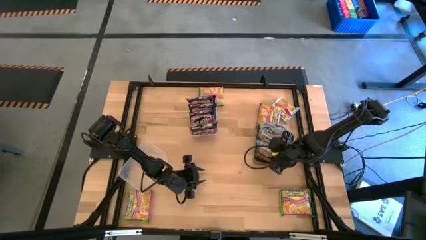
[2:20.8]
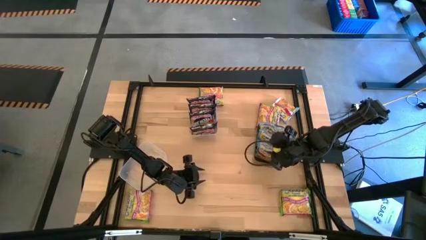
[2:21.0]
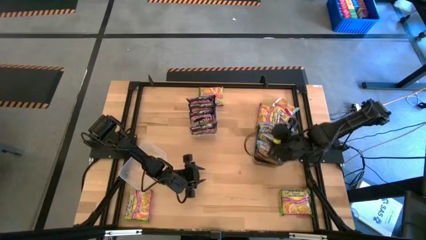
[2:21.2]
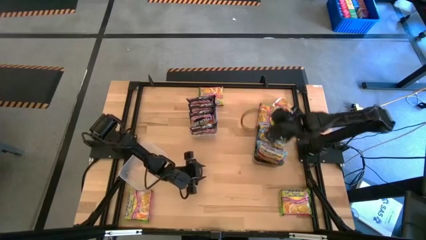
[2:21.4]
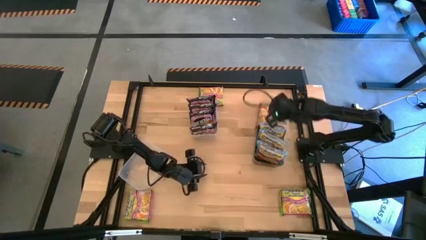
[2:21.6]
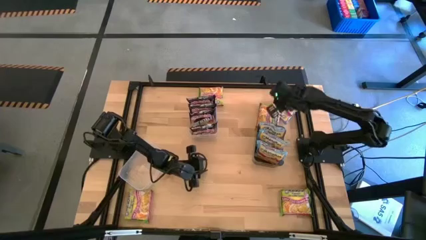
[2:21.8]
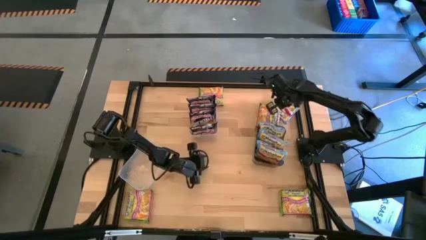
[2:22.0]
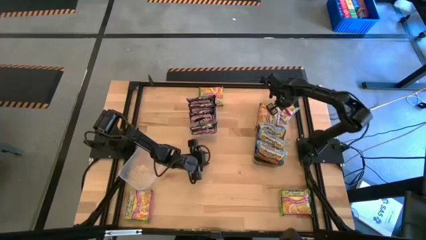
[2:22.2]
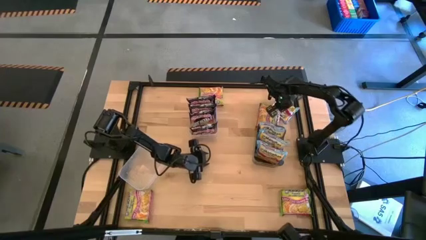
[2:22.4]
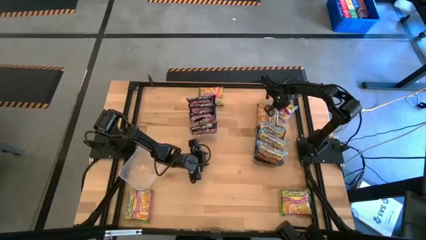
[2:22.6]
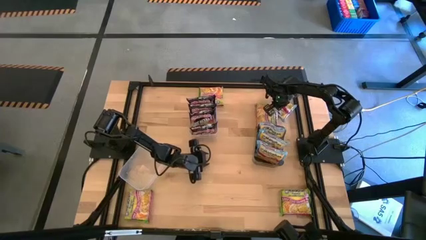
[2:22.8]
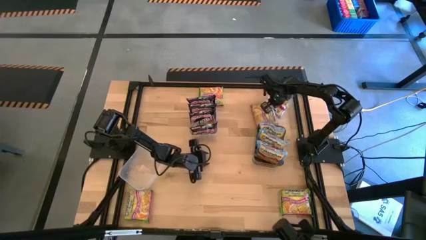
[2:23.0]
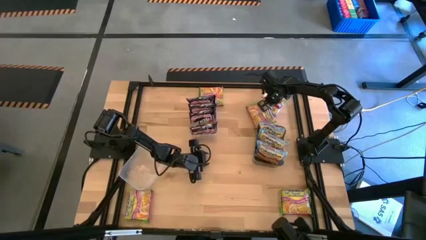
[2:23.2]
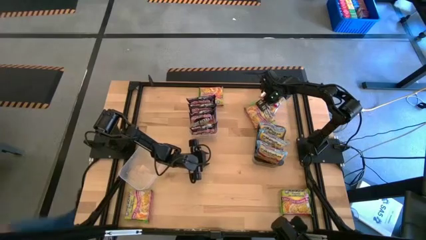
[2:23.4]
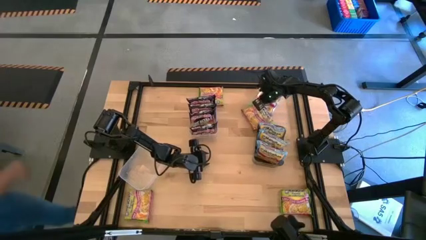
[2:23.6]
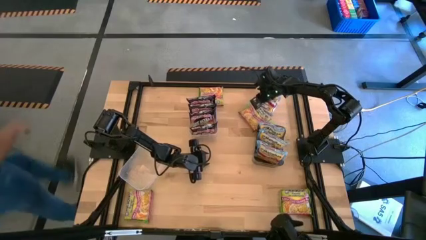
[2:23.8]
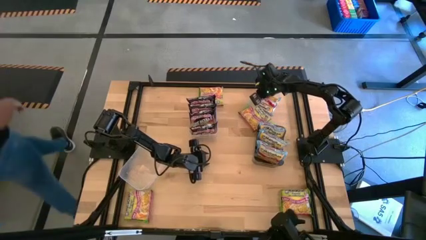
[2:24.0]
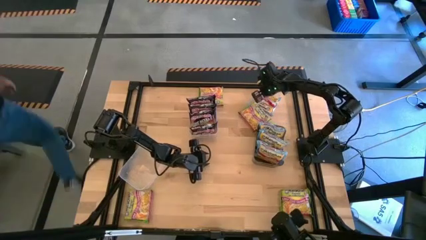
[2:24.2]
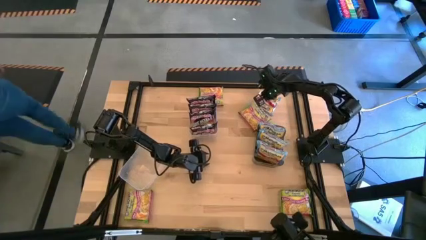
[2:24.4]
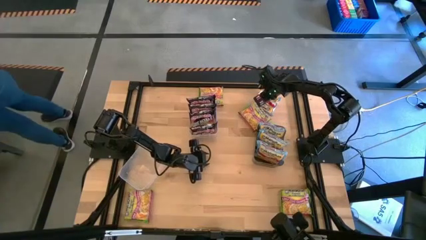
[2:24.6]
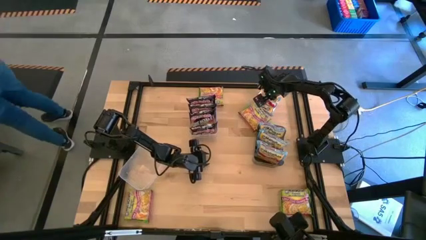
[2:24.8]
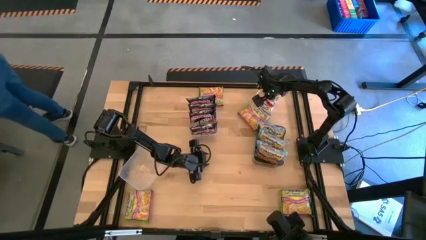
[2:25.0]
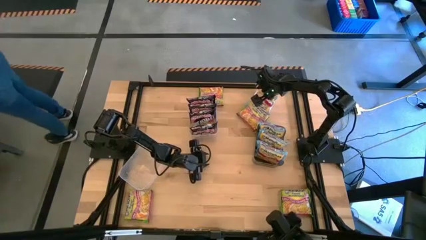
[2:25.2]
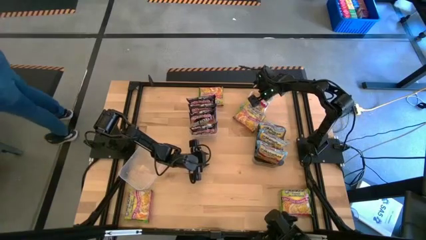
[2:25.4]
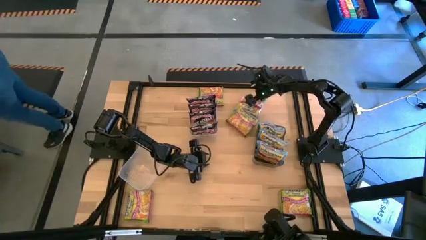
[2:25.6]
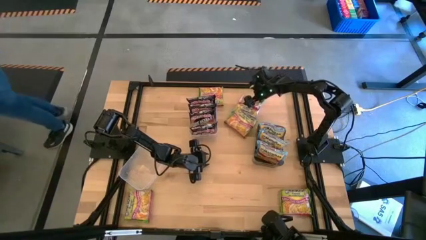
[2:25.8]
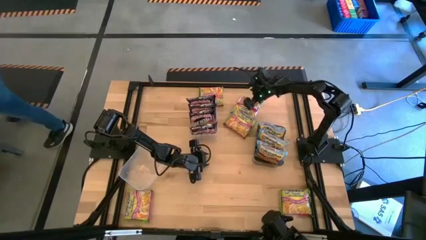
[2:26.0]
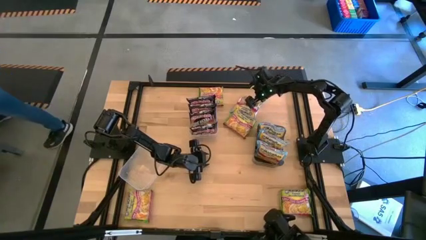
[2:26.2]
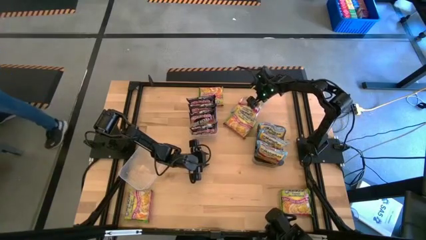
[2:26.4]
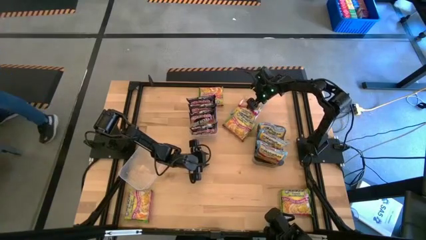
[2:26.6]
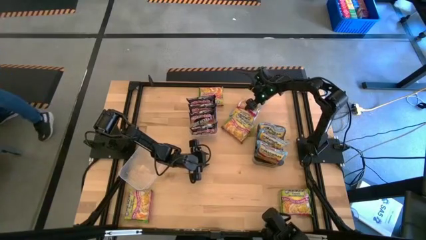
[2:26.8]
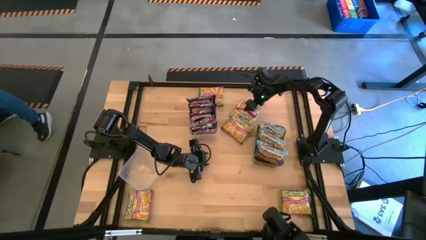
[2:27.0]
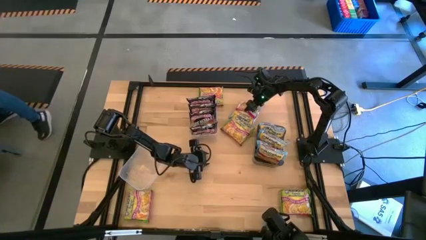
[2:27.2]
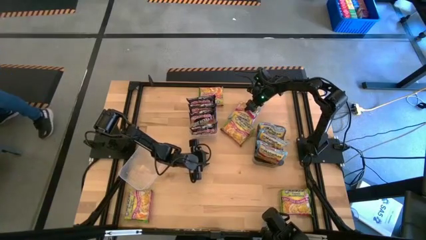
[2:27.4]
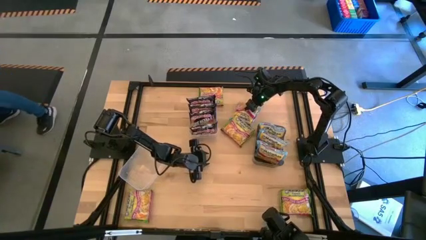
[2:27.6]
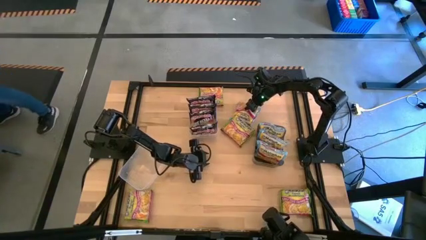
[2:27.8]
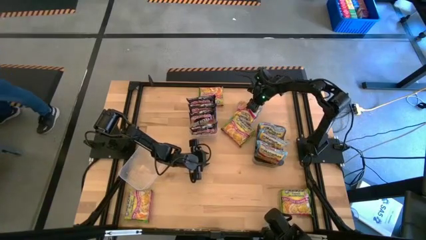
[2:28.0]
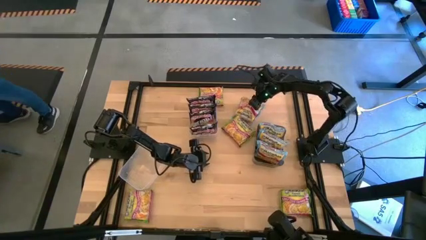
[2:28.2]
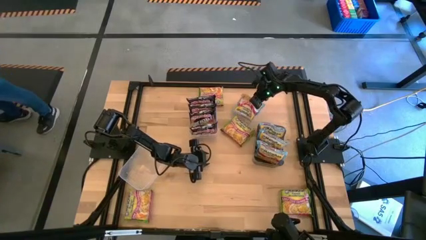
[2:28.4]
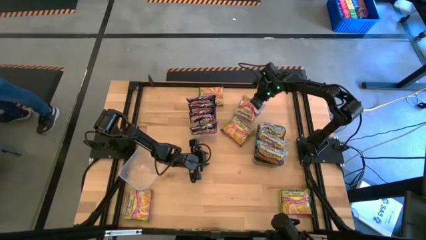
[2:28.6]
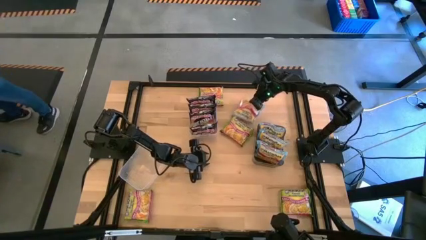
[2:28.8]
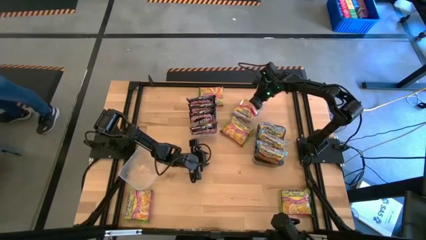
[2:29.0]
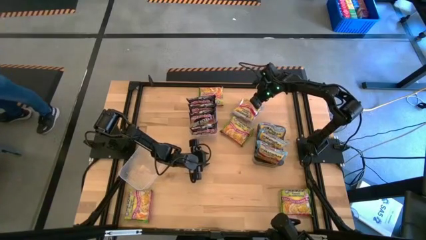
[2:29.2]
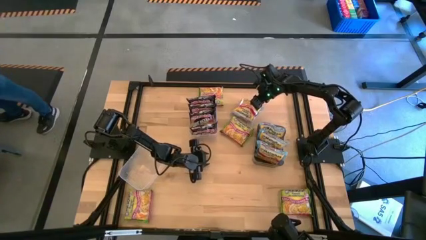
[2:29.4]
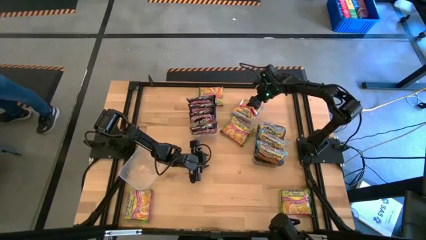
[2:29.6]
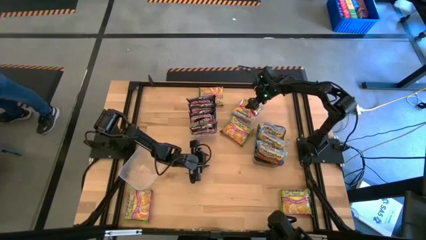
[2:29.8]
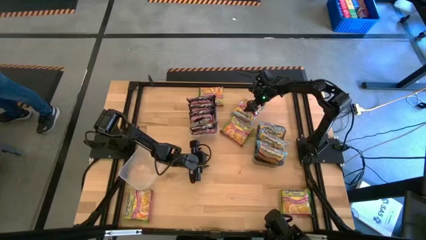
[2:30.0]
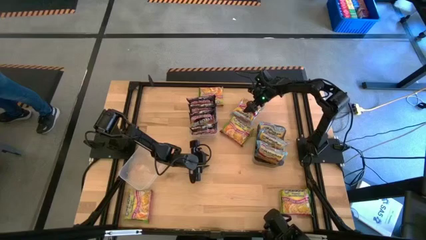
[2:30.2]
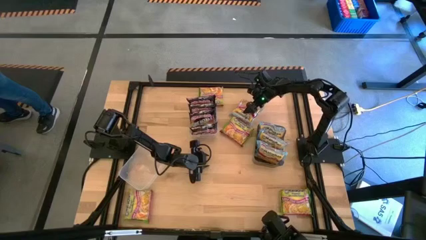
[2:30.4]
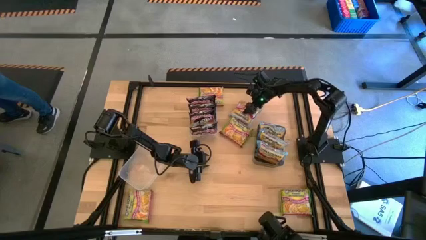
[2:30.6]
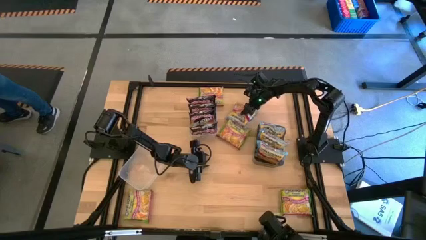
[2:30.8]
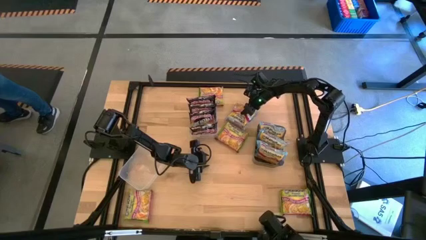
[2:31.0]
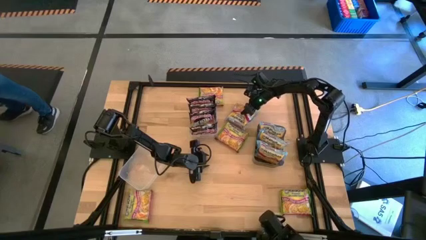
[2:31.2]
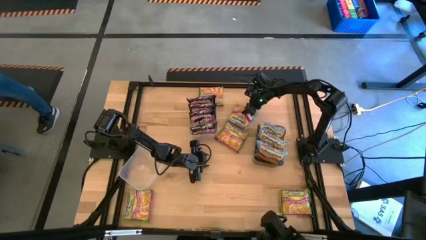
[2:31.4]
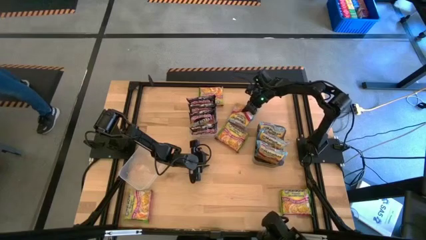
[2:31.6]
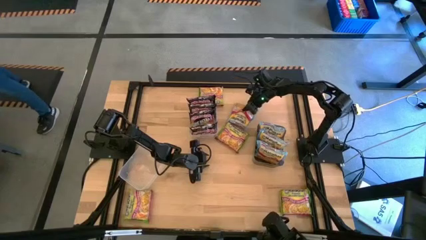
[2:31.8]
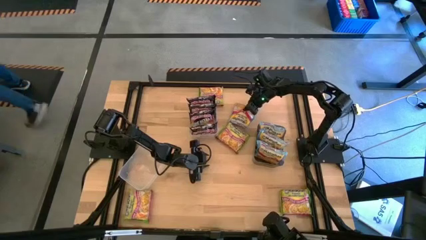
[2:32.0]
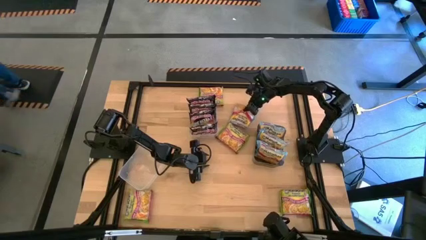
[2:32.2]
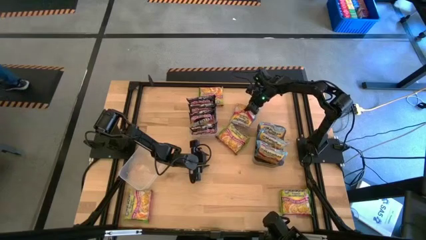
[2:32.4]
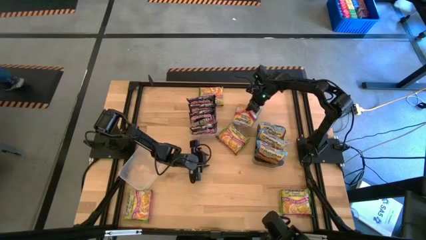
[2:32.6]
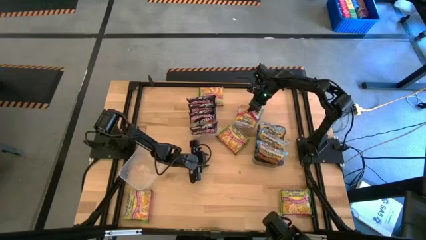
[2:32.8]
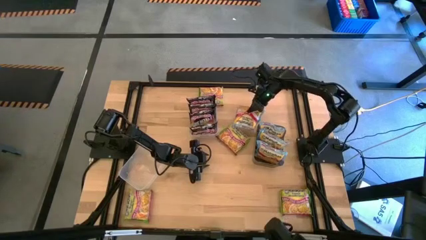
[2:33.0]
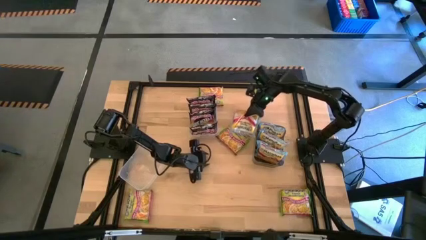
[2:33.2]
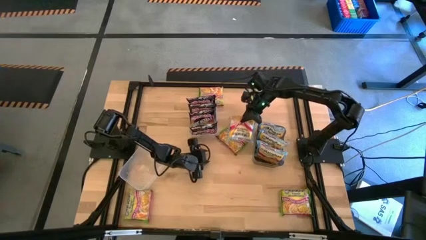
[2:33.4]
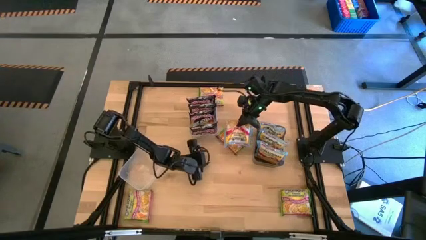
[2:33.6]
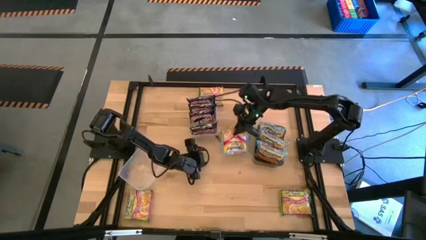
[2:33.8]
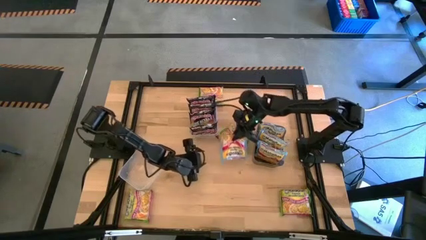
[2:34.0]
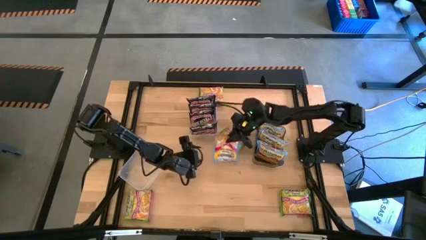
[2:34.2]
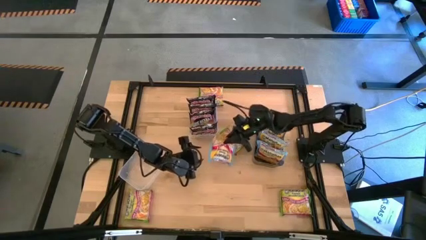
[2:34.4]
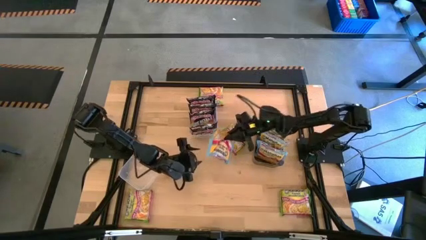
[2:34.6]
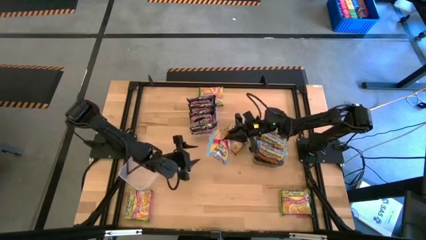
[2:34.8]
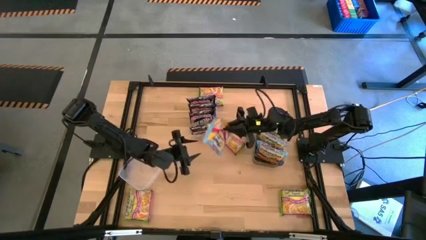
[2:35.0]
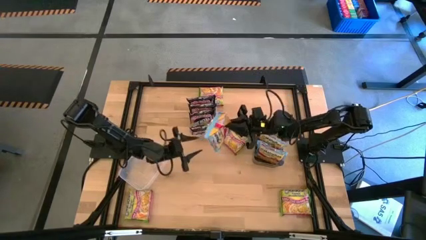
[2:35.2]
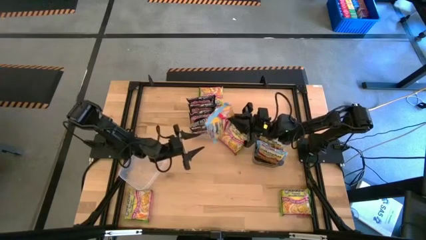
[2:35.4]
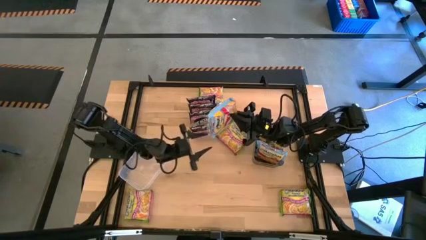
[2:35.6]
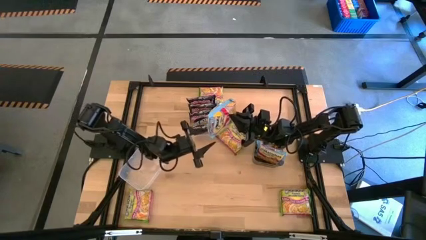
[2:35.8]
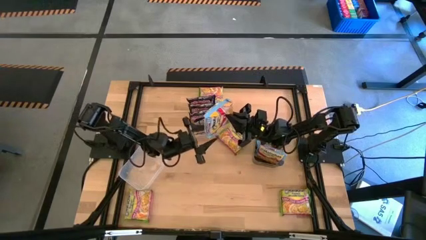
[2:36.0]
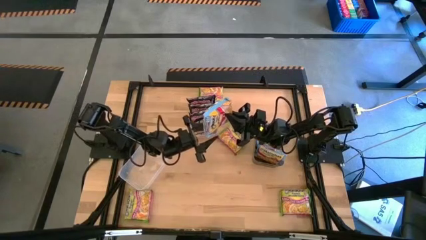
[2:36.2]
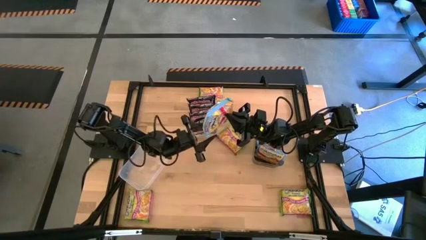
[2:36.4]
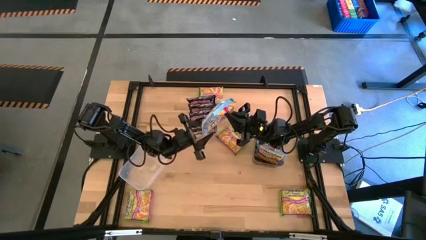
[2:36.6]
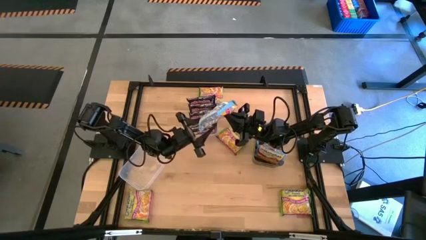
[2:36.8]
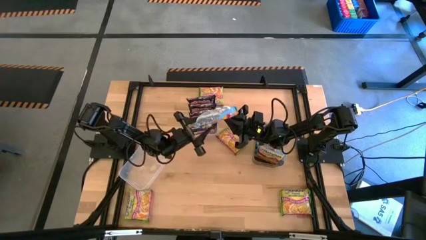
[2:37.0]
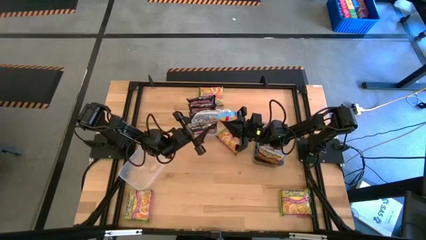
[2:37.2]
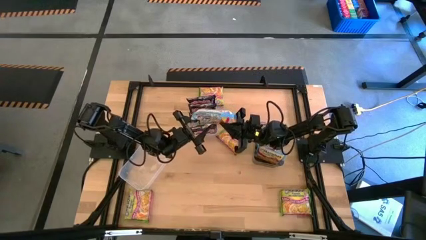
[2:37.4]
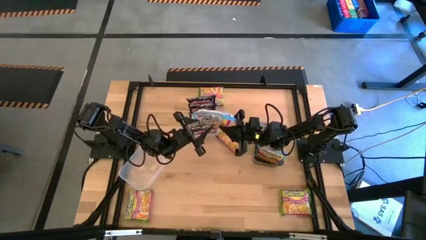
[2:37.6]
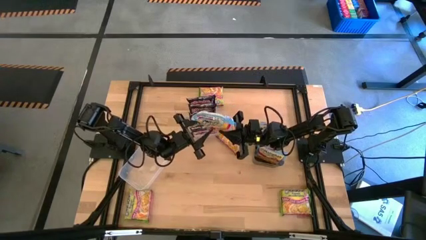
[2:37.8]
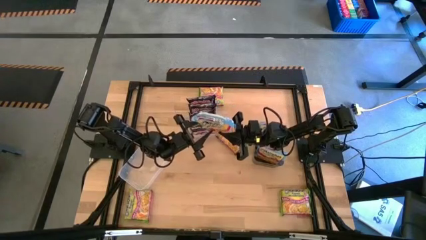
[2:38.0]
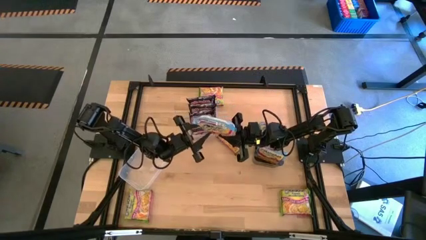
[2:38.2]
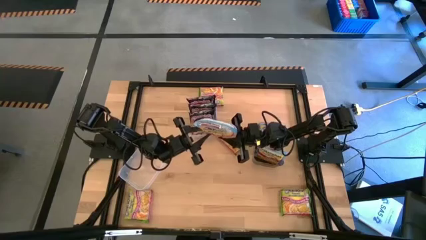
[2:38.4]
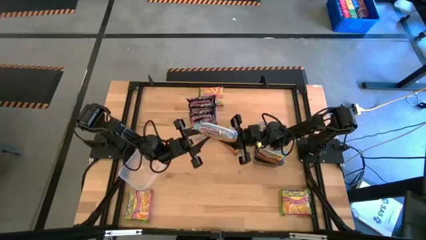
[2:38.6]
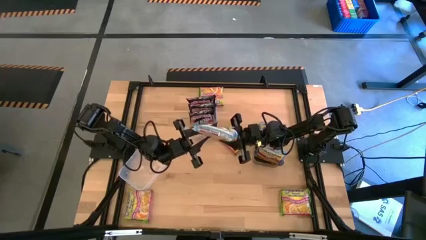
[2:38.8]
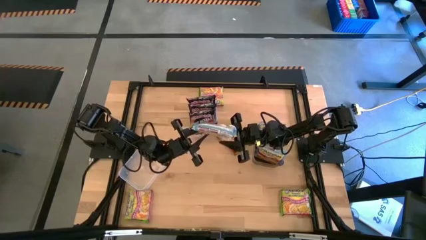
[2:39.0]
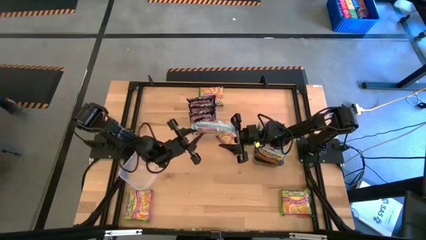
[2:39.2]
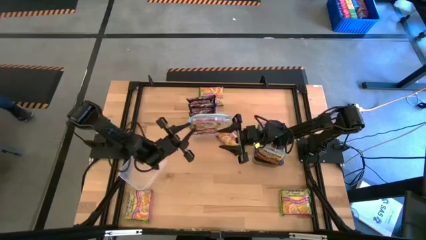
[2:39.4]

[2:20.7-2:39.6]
Task: Sort Maruchan noodles
Put the blue noodle pack into the black bin
